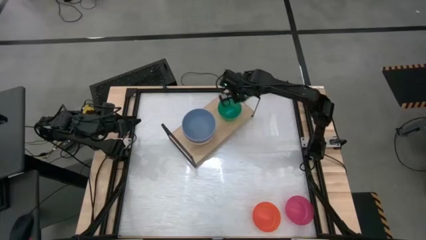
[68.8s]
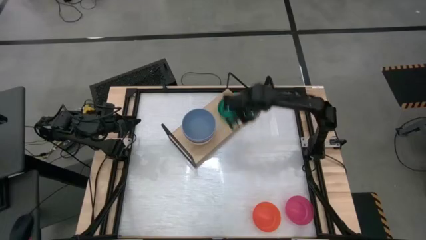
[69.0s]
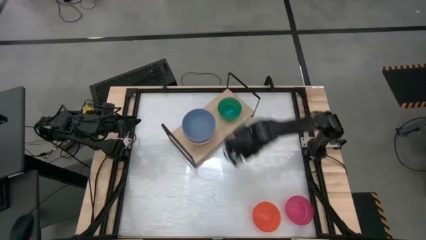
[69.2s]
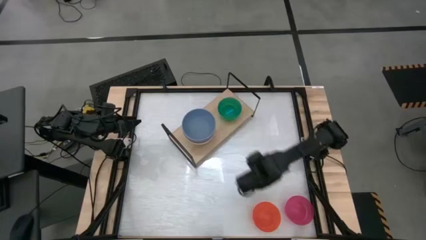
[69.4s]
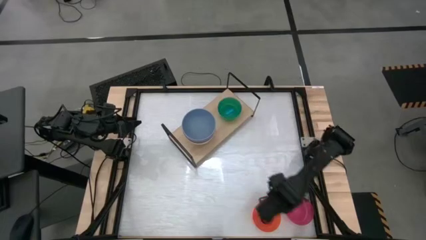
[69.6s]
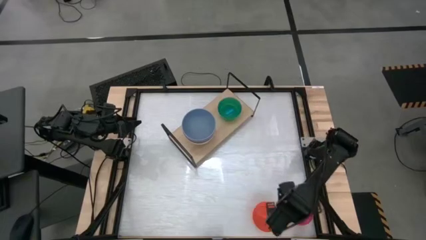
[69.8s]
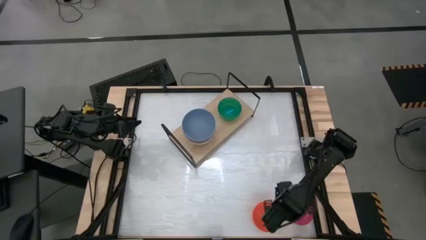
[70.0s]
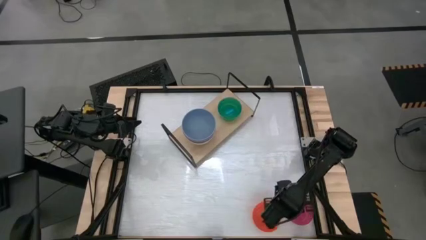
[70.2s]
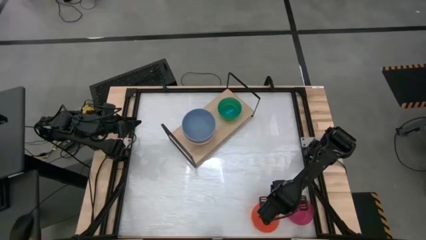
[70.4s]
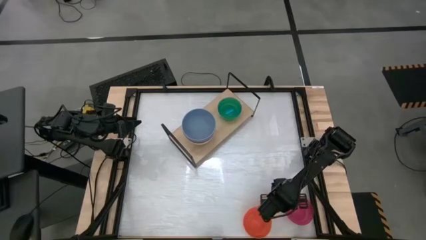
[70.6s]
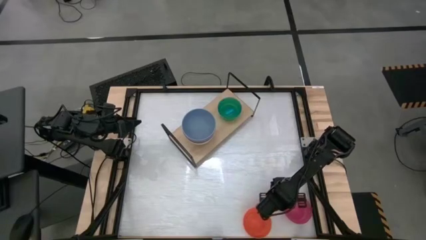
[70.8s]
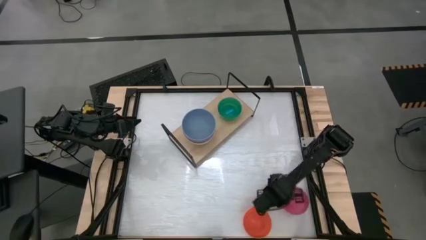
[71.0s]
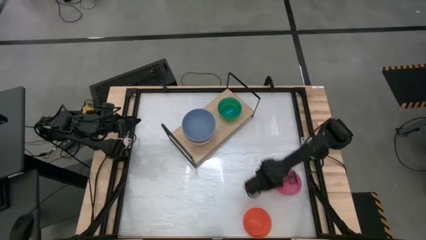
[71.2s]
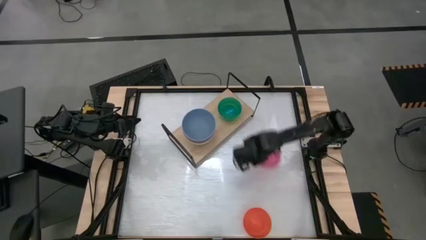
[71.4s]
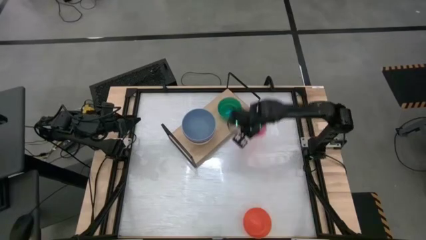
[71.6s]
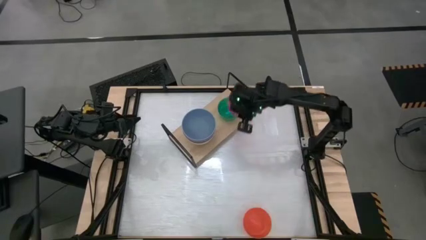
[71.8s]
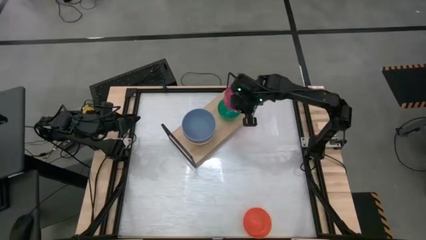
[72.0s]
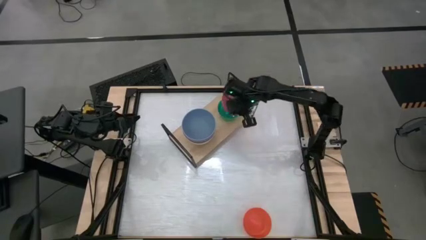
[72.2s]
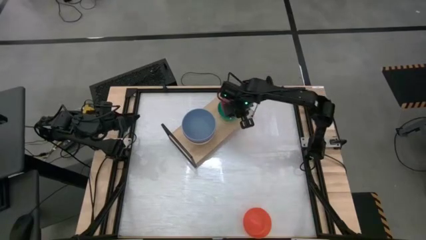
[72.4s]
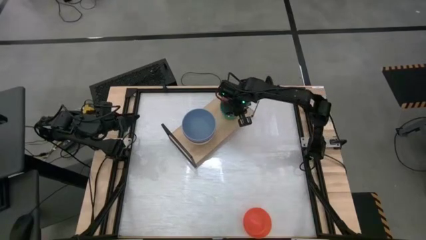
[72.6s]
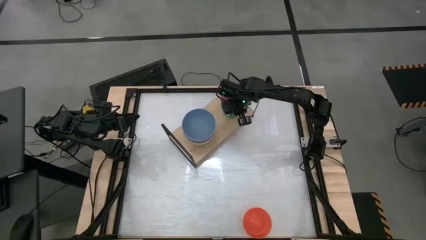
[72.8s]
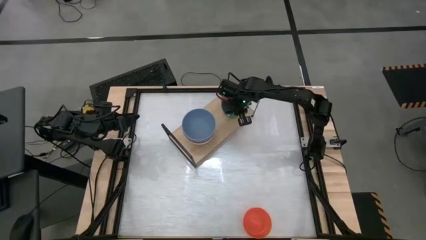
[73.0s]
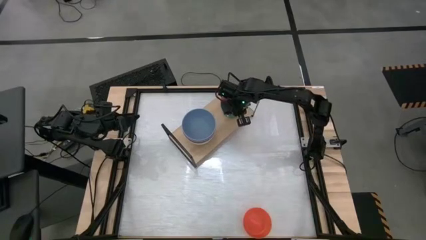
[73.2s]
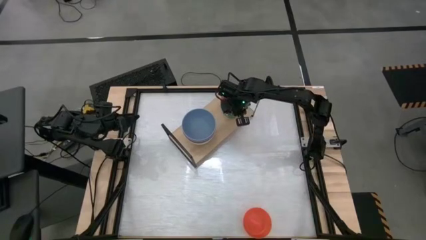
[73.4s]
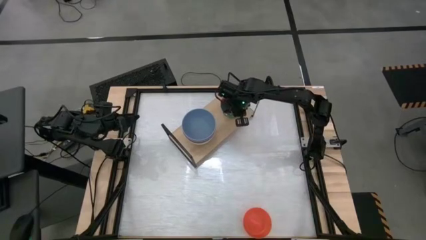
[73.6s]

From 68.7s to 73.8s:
Task: Place and stack bowls onto a shelf
Stack the light pink bowl on top of the light blue bowl on the shelf

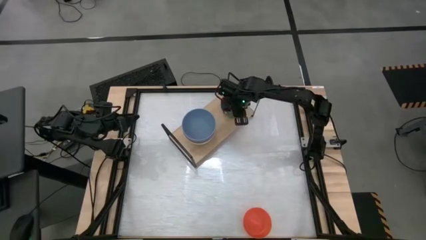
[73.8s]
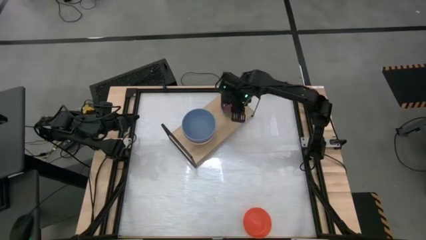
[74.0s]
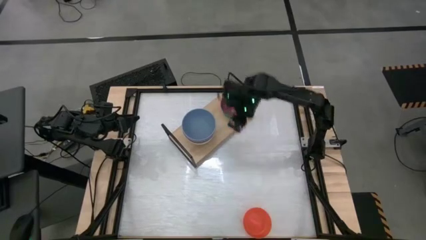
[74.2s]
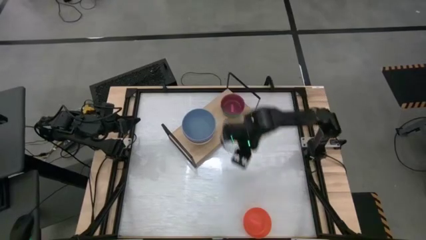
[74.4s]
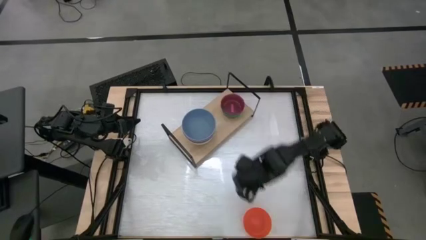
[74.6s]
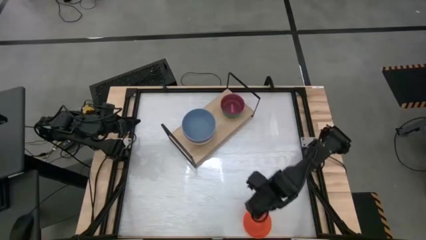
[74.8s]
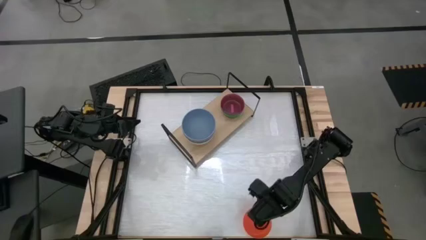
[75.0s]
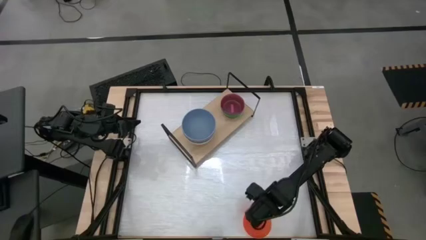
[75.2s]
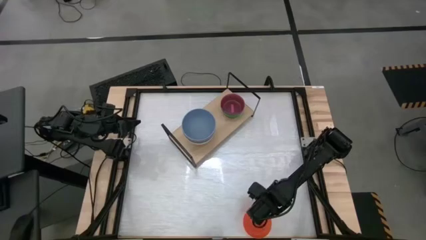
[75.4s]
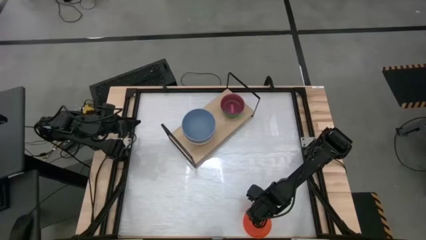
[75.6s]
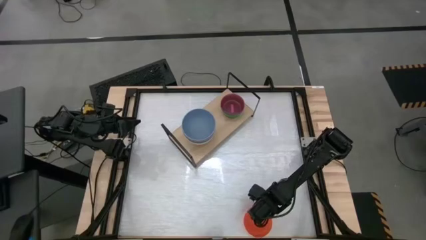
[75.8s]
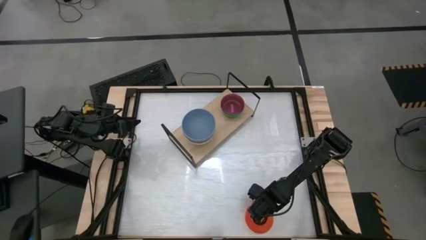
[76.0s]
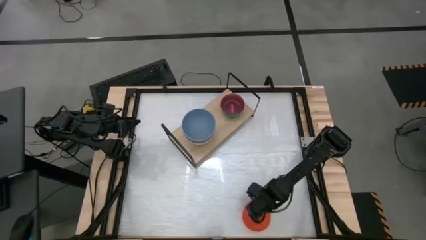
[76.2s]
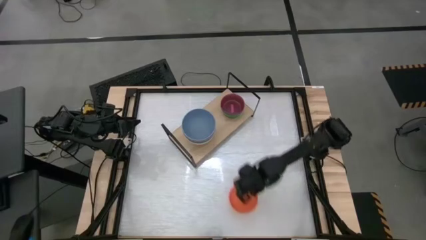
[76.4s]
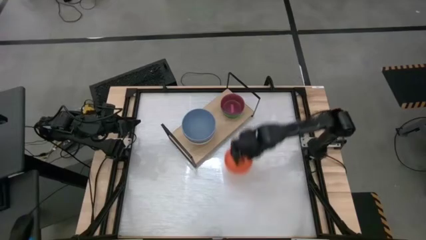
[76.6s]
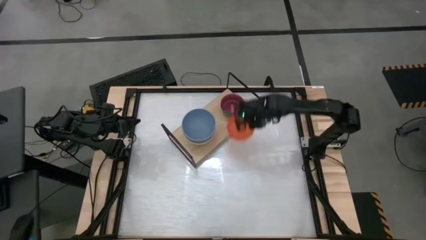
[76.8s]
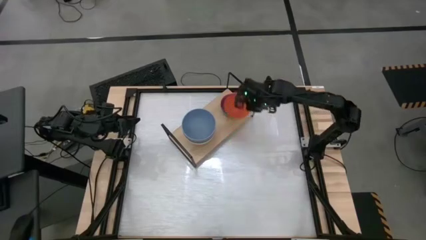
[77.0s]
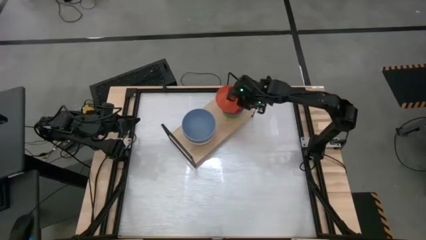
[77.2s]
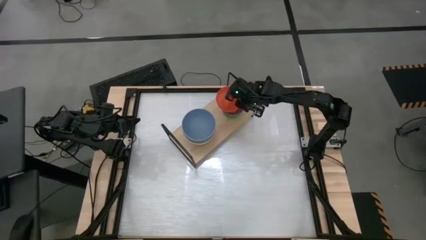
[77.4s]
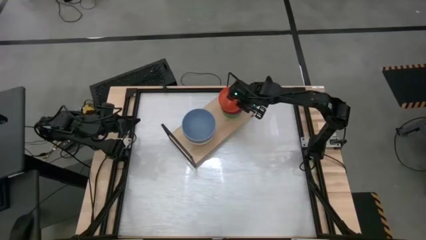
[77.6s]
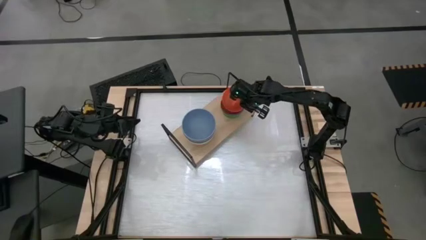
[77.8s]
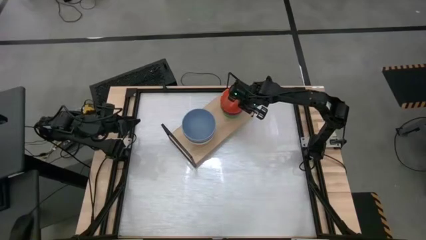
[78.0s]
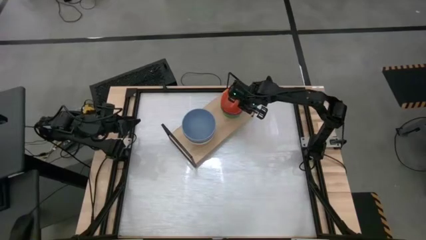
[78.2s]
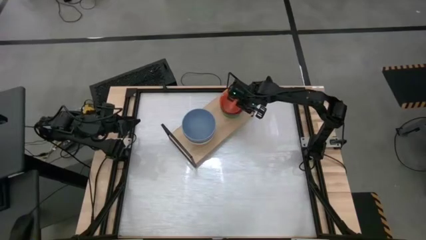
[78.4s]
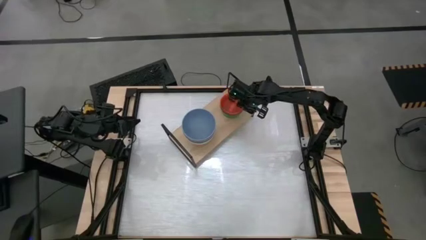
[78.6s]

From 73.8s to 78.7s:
Stack the orange bowl on top of the light pink bowl on the shelf

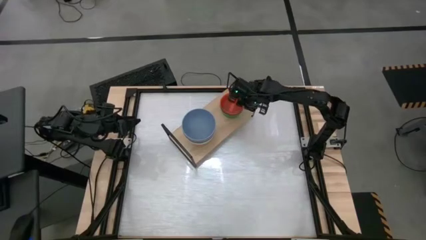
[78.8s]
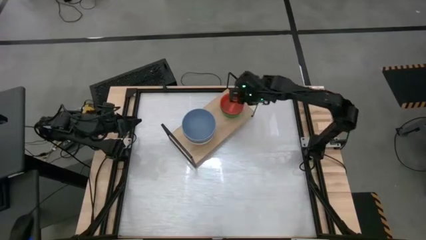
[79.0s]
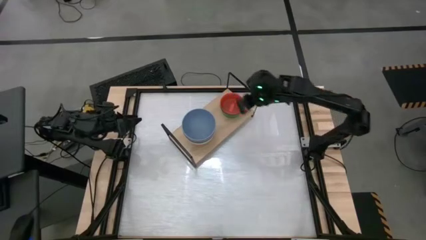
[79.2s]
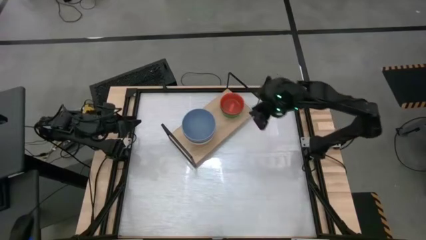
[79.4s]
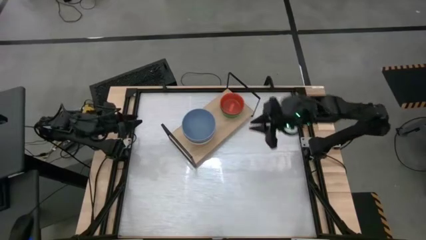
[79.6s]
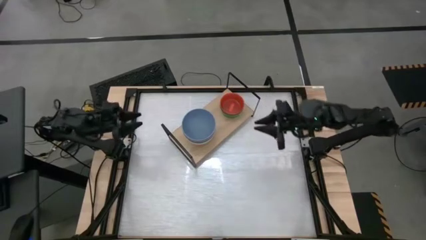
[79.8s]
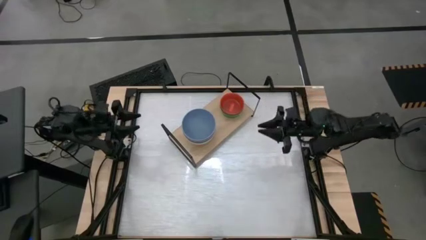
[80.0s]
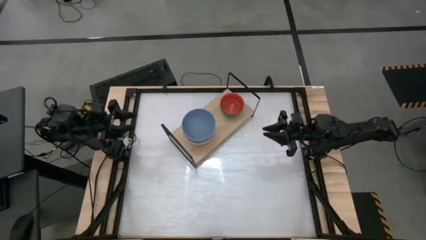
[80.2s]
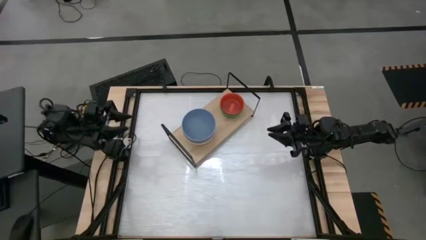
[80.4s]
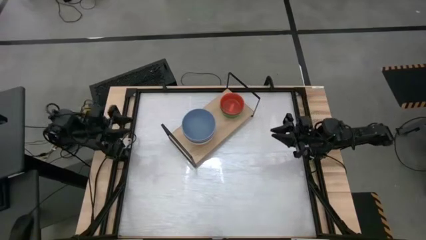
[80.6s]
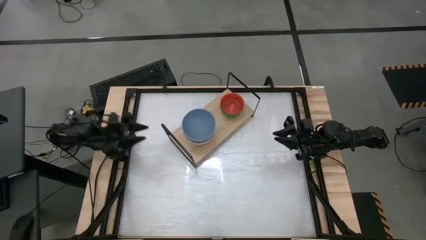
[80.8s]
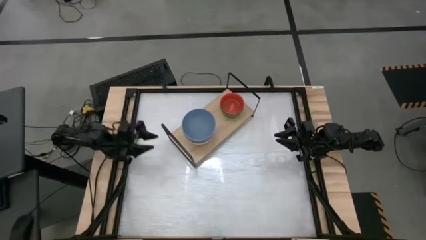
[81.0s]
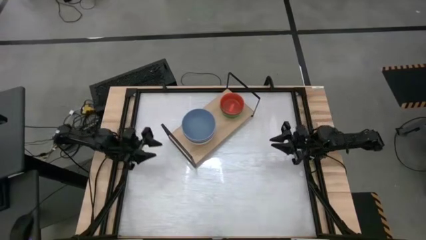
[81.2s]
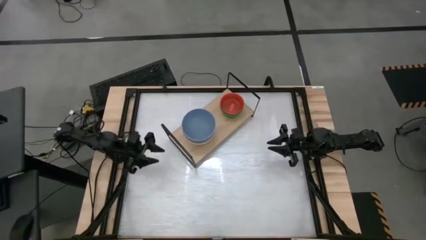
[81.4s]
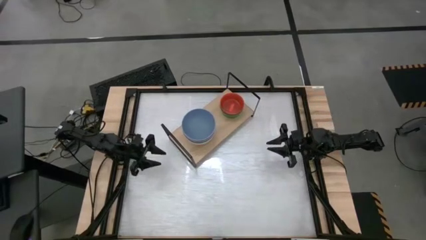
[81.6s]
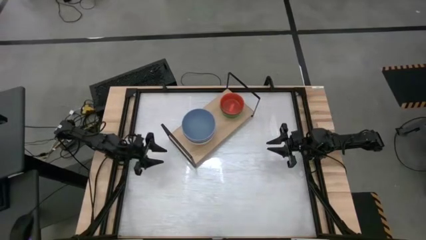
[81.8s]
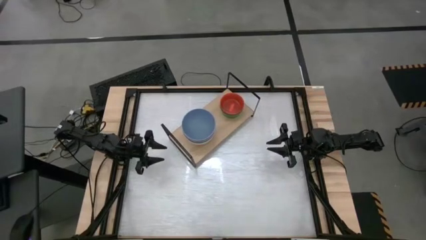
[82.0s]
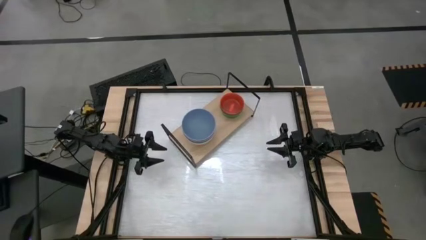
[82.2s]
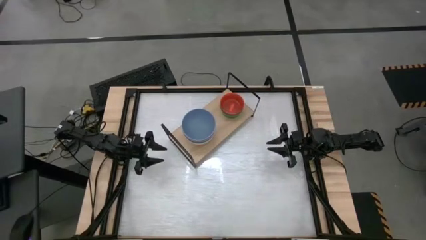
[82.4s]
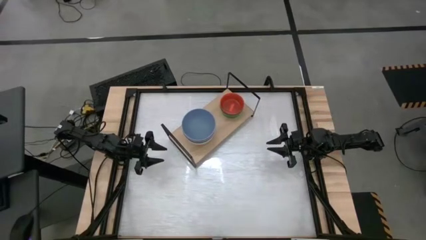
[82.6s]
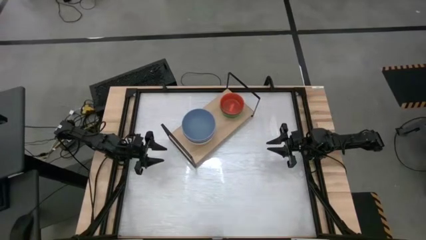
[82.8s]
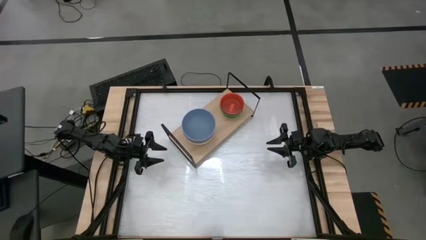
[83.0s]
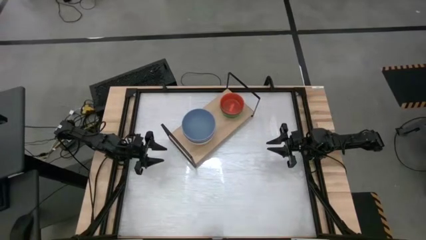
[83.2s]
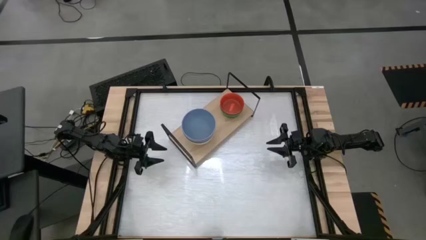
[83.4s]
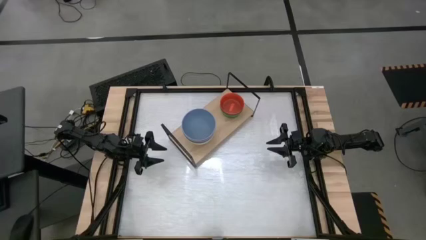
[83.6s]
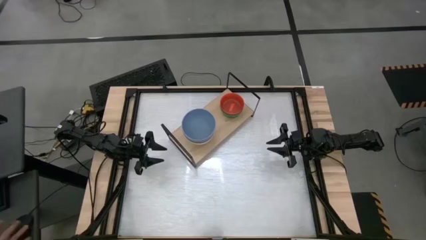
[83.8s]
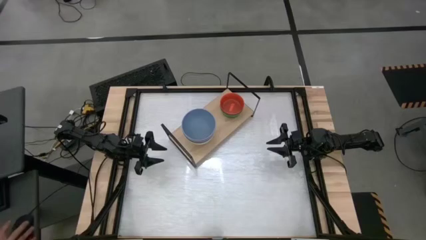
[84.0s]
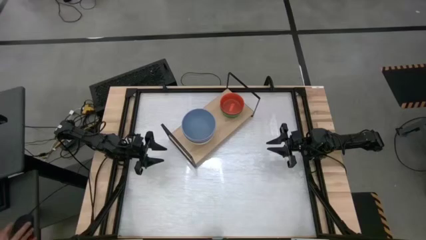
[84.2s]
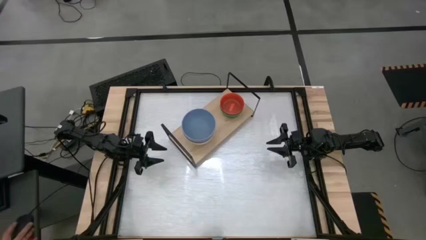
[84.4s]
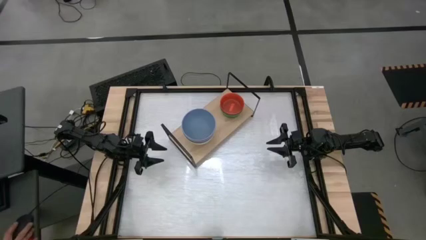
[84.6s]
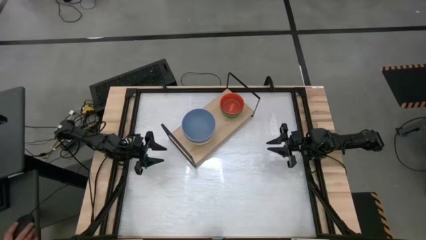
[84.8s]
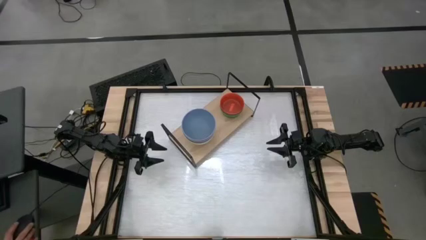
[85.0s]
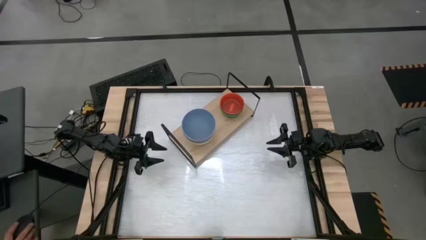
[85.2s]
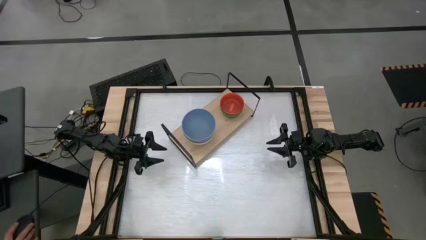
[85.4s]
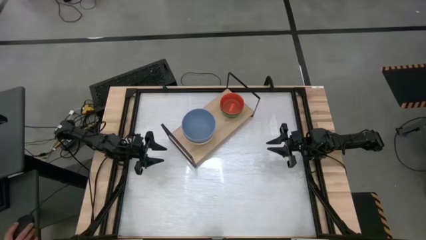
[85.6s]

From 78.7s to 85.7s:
Return to Home Position
